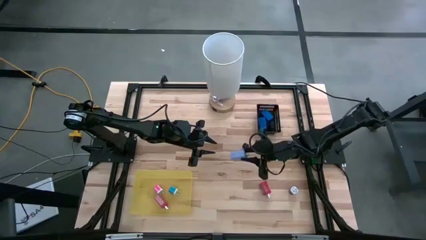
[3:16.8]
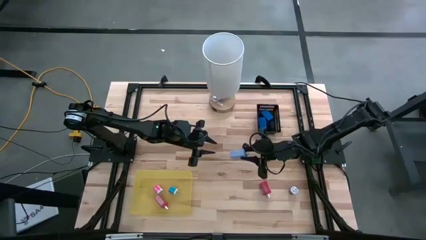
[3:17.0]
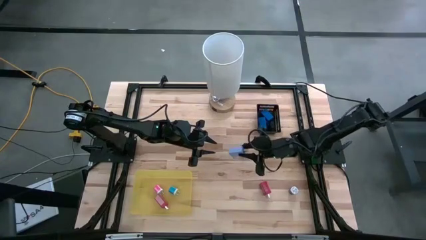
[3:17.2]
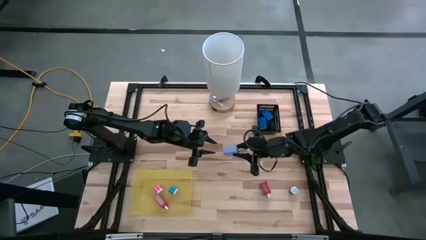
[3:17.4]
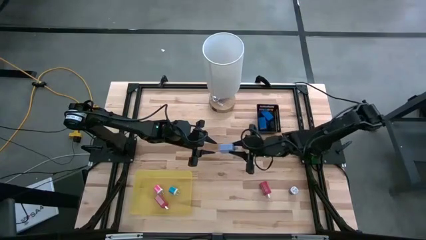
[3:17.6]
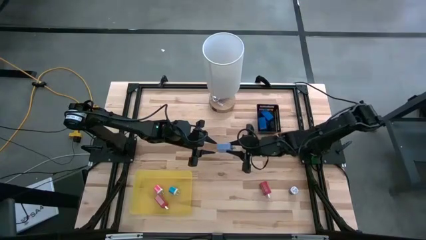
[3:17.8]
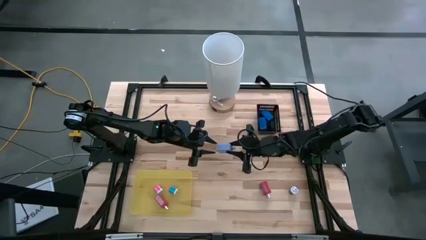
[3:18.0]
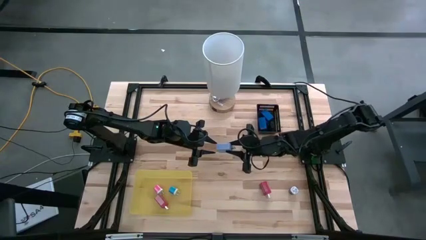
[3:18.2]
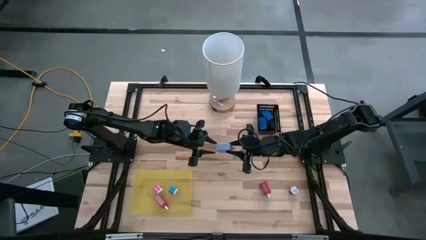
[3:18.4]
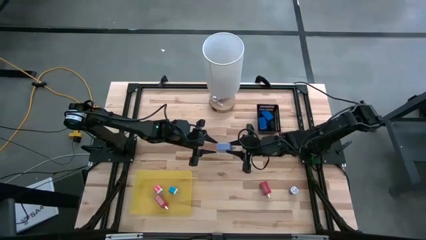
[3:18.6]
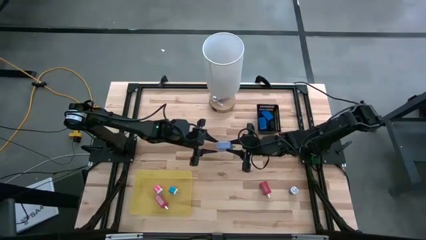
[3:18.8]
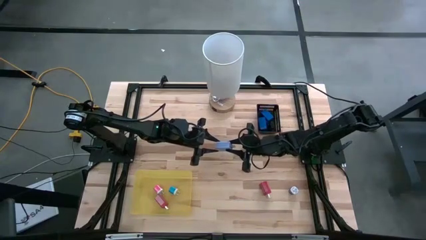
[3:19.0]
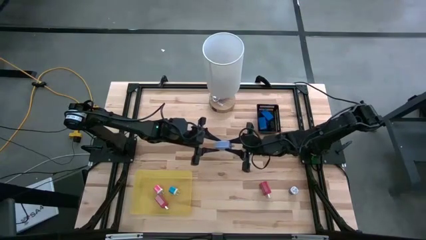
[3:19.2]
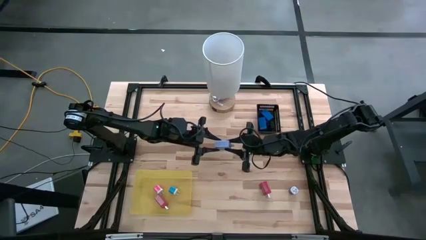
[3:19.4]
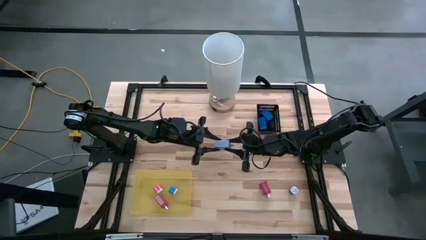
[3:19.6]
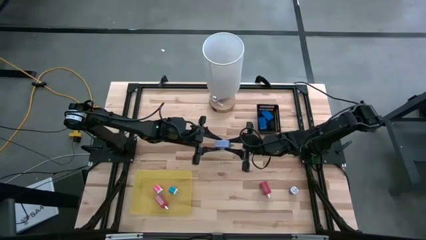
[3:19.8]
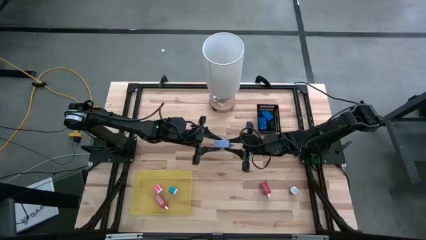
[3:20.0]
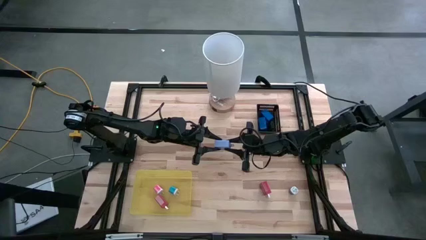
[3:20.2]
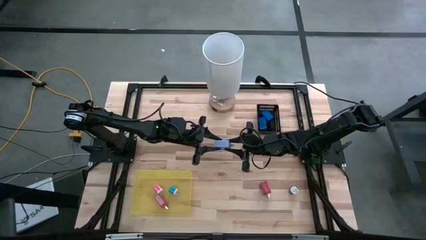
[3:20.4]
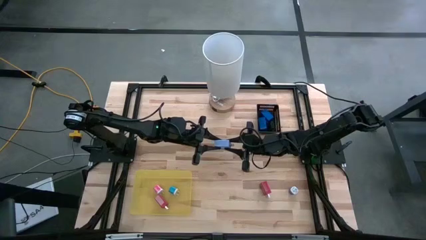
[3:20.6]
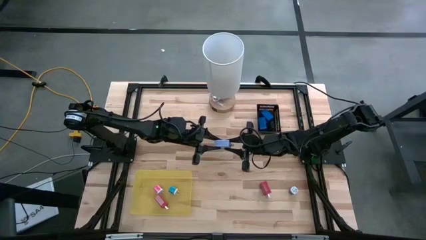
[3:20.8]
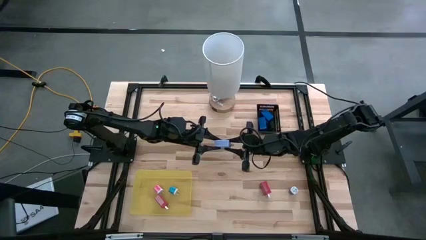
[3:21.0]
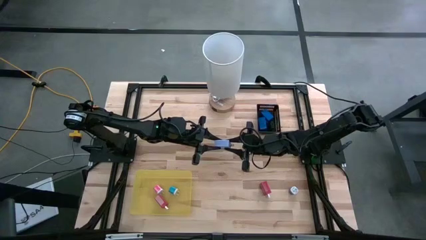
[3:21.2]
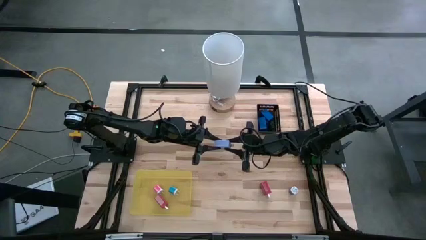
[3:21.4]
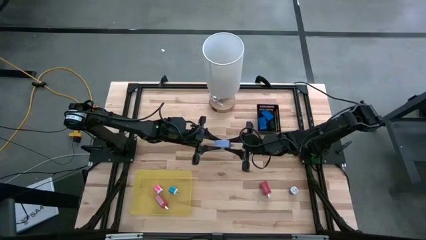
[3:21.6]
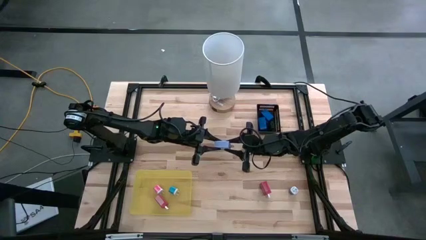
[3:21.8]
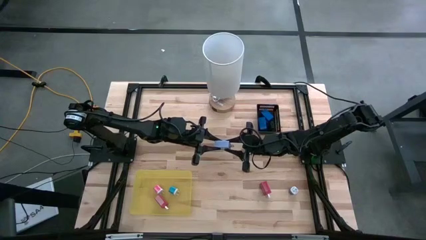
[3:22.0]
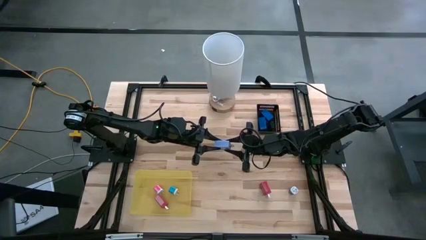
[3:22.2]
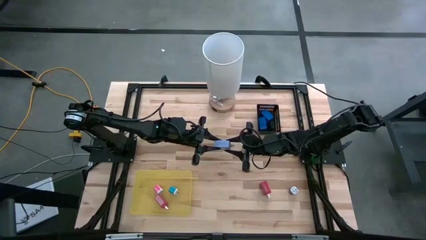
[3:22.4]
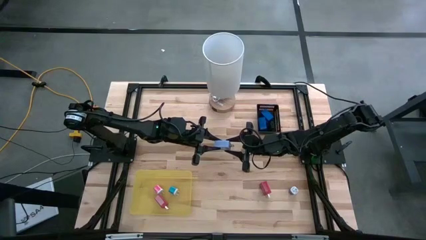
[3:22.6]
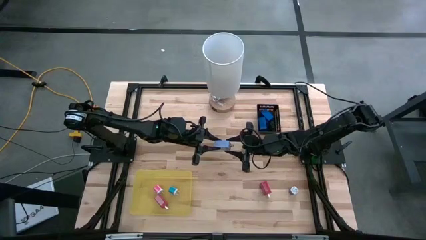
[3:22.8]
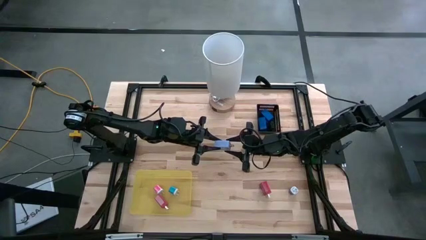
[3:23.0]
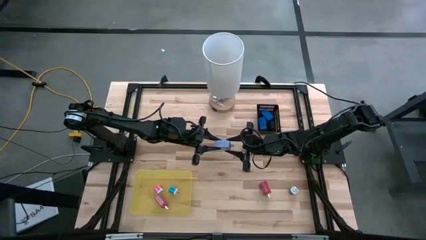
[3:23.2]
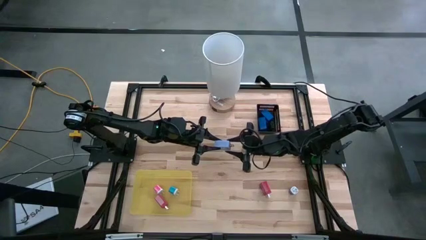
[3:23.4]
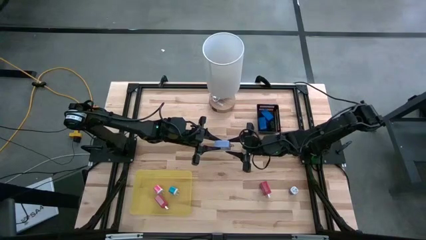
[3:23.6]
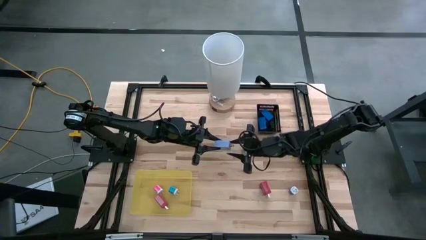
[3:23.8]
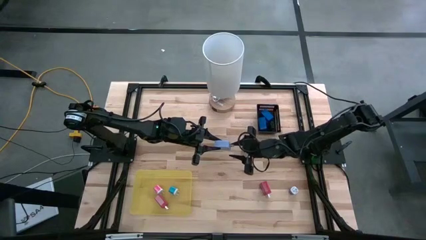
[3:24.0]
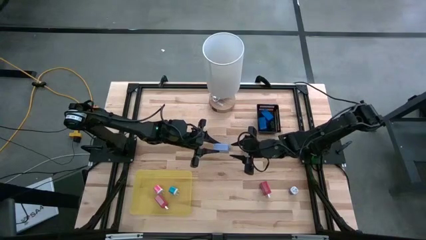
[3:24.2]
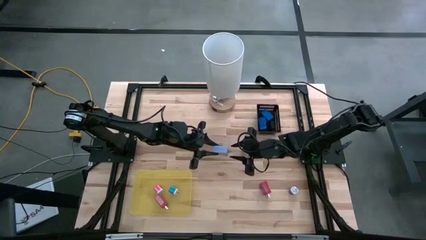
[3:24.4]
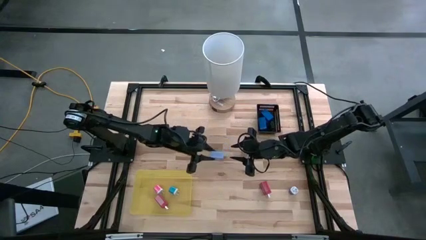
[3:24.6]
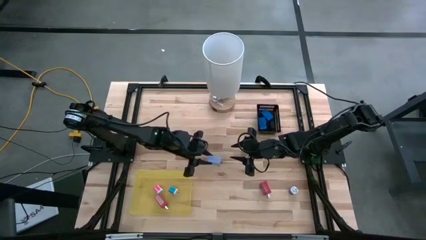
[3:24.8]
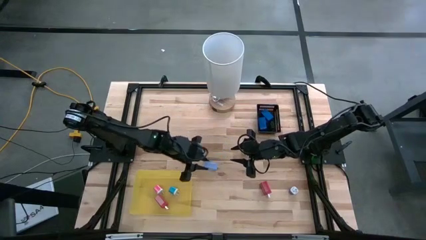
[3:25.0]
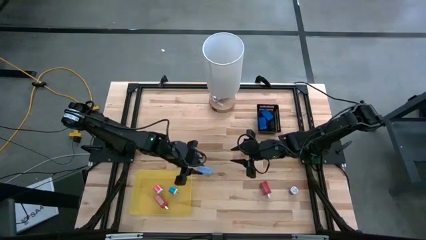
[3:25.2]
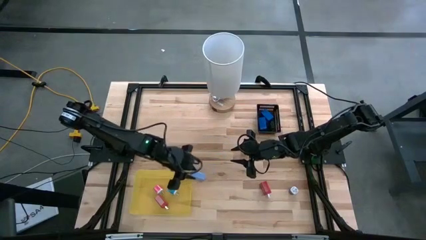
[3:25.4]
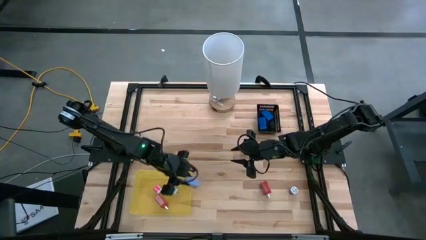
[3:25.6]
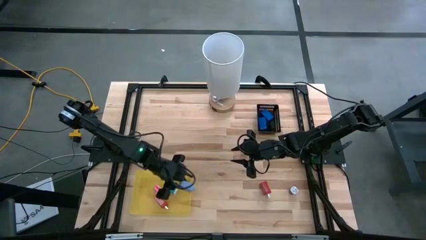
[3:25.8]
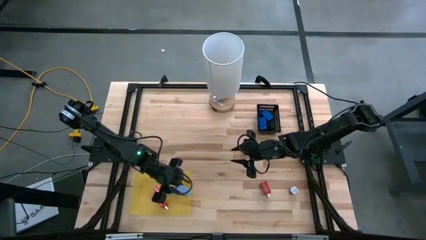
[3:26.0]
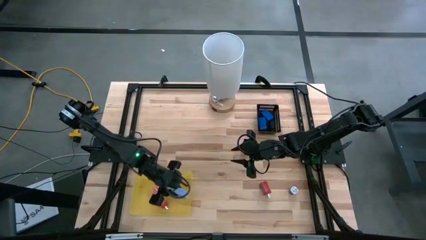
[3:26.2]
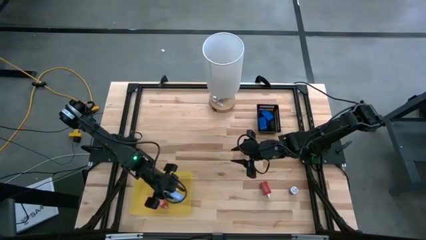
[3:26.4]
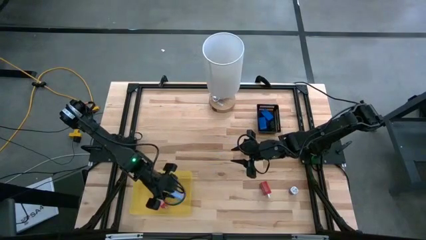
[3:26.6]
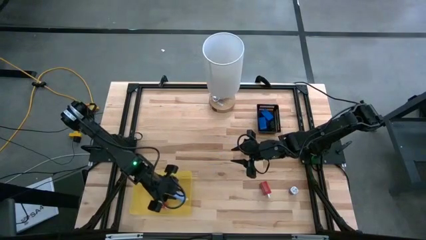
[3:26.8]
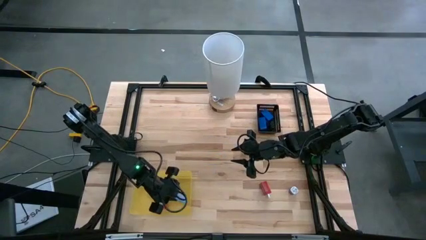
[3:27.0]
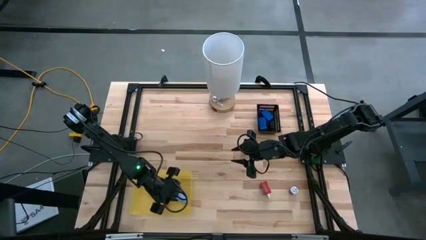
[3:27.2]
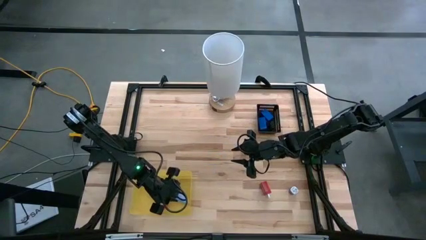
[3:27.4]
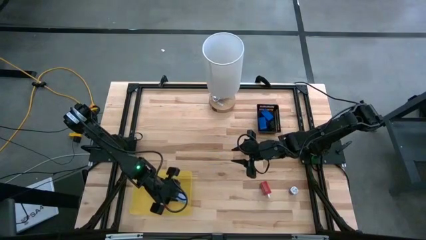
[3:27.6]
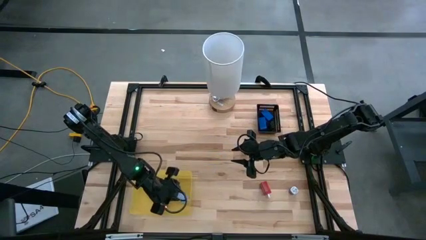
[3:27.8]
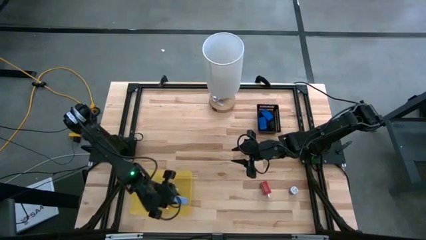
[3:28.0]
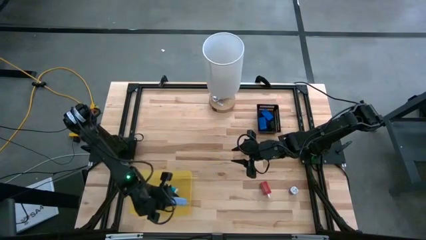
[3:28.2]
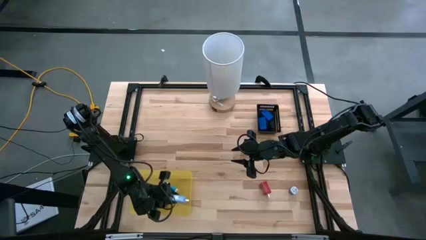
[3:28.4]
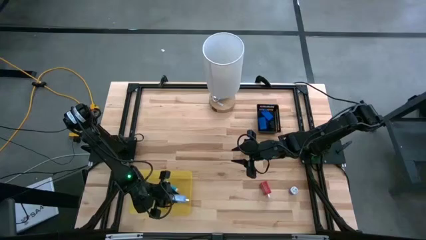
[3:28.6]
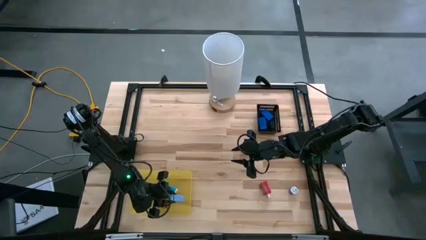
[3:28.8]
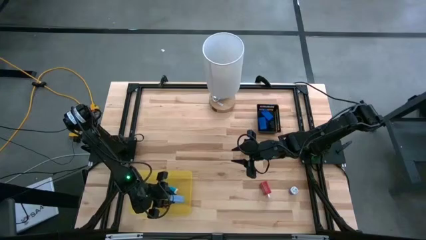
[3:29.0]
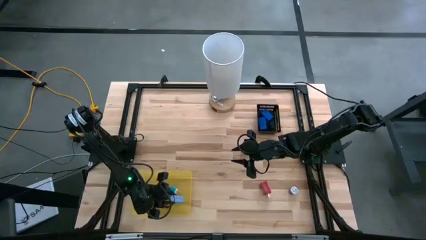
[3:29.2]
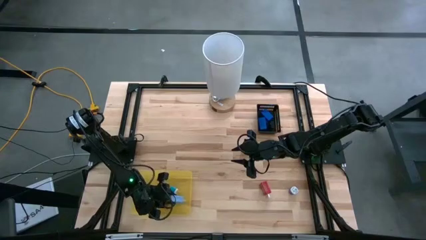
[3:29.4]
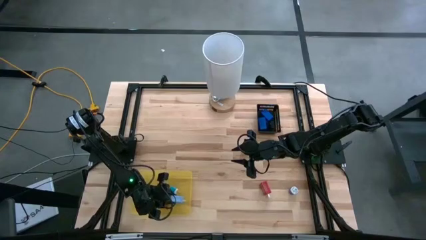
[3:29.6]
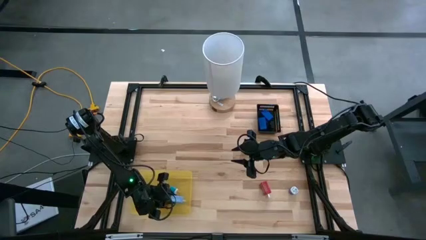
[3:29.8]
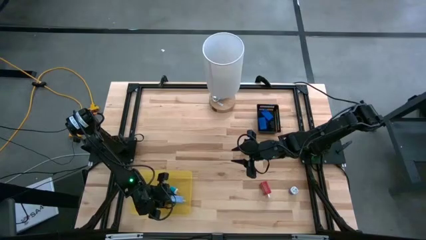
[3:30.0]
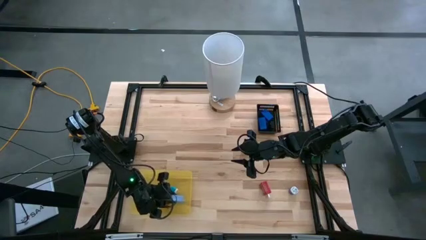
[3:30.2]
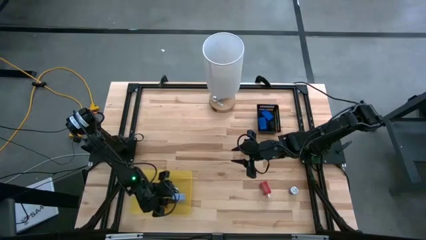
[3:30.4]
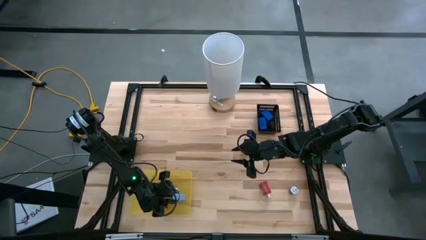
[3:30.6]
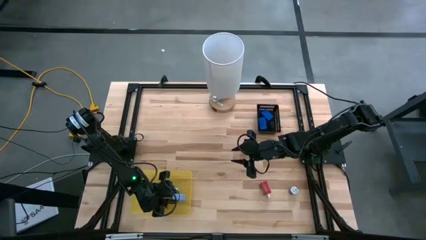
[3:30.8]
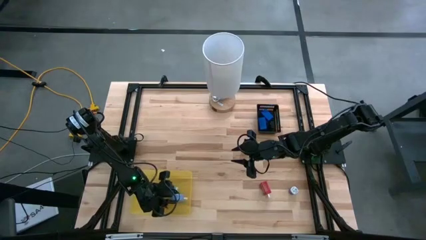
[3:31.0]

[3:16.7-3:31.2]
Task: Pick & Place Office items
Put the light blue charger adapter into the yellow bin

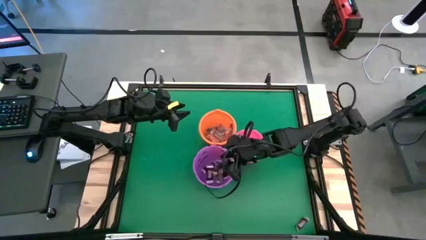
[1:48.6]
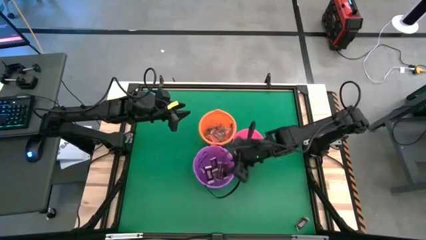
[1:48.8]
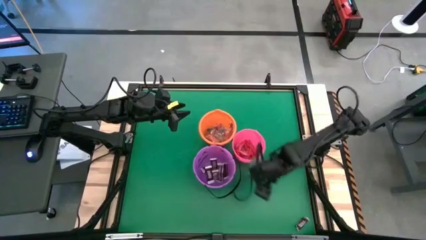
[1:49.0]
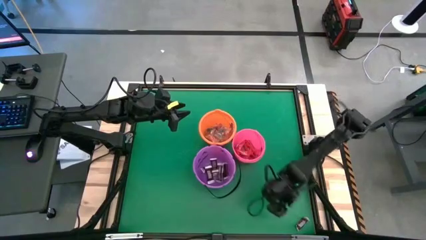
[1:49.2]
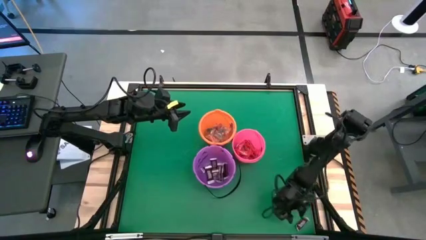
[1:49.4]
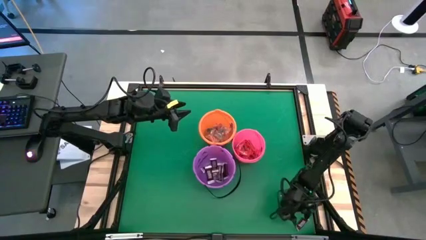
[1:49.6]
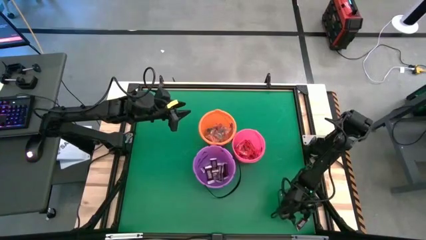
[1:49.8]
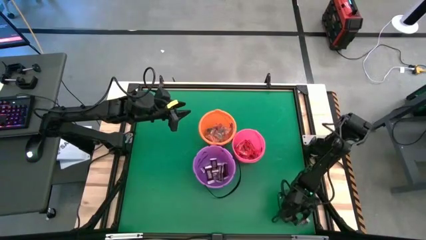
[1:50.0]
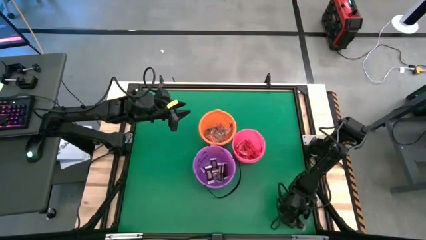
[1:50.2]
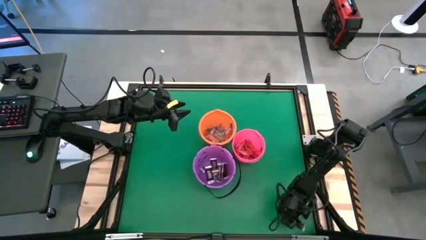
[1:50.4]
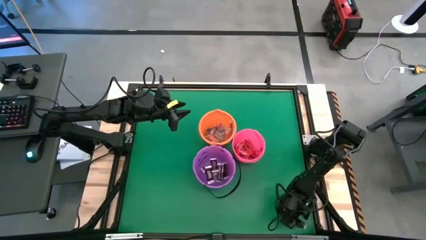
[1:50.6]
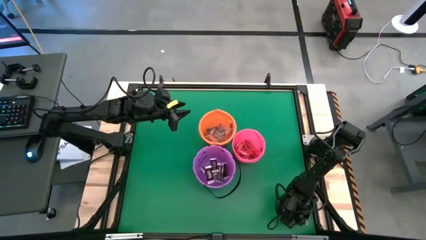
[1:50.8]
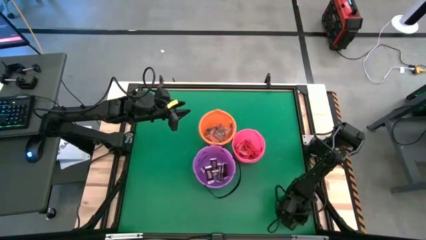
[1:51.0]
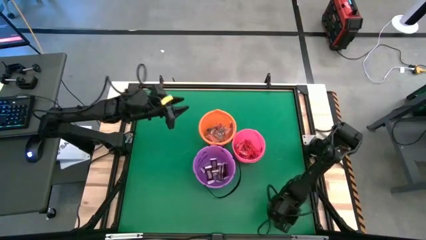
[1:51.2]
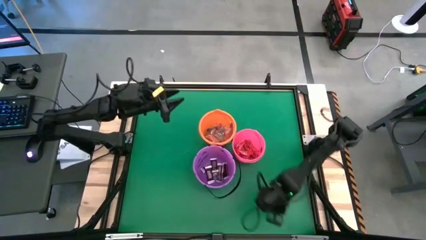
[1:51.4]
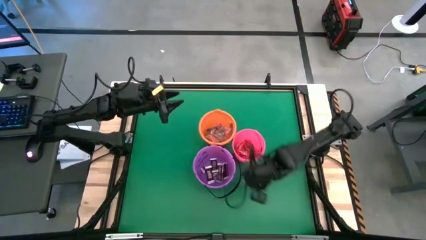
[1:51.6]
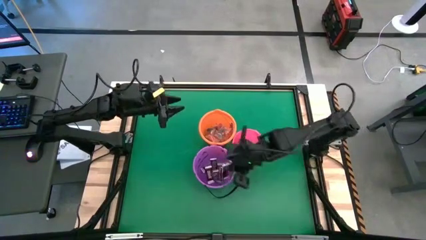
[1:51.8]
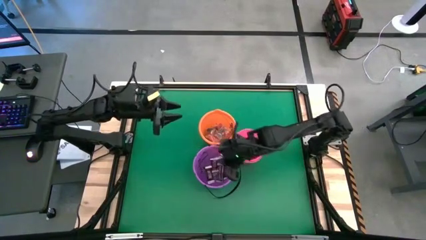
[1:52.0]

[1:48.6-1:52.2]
Task: Sort candy by brand, put in halloween buckets
Put the brown chocolate bar into the purple bucket
